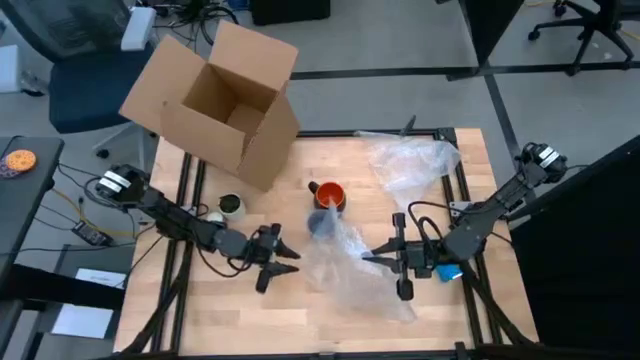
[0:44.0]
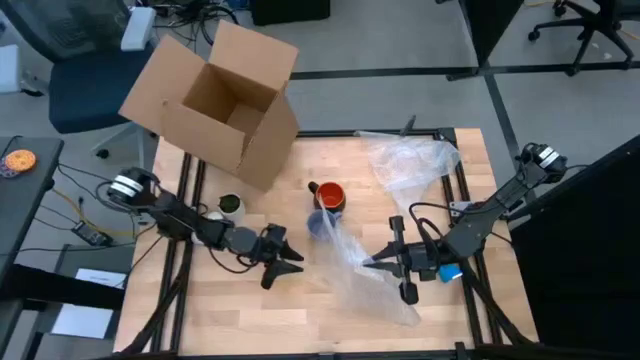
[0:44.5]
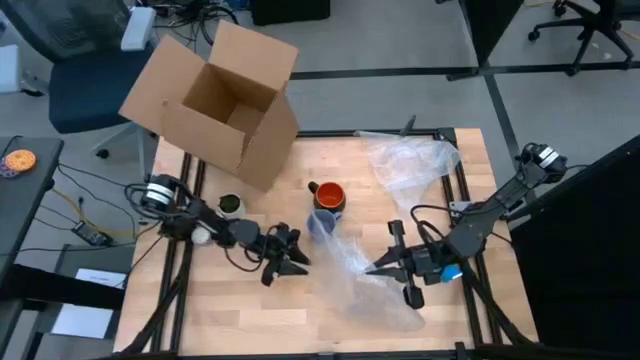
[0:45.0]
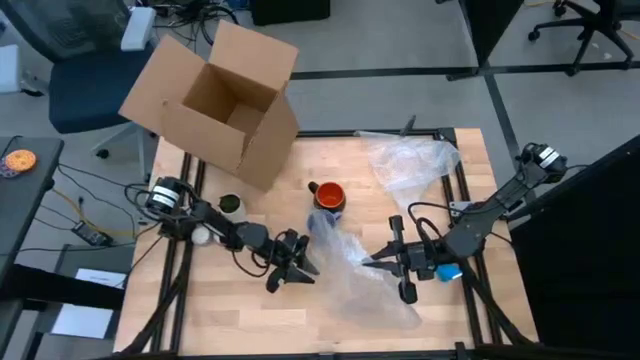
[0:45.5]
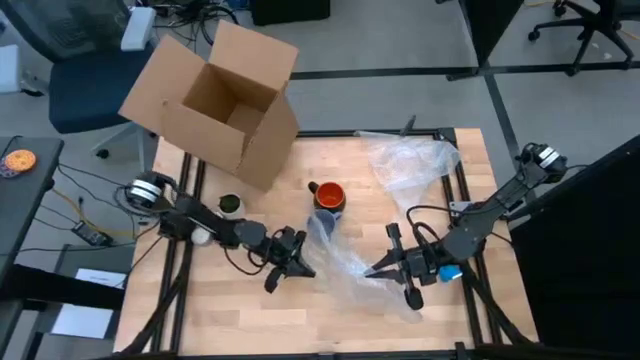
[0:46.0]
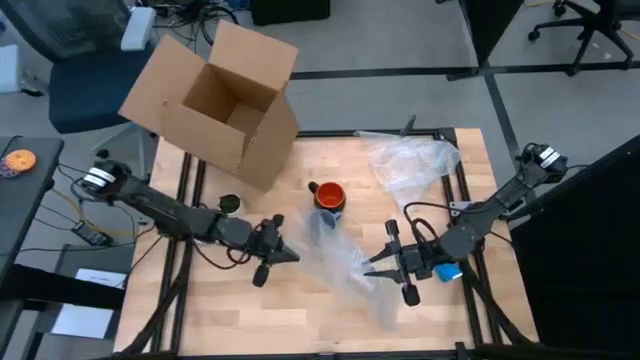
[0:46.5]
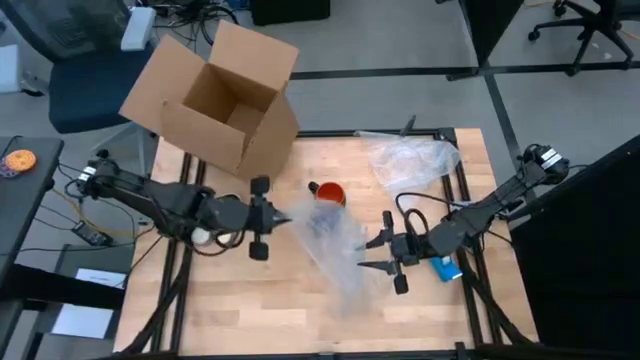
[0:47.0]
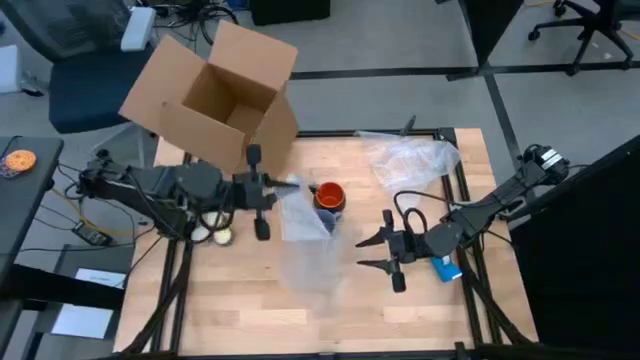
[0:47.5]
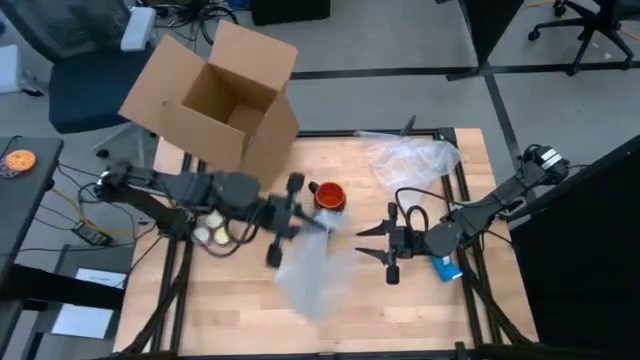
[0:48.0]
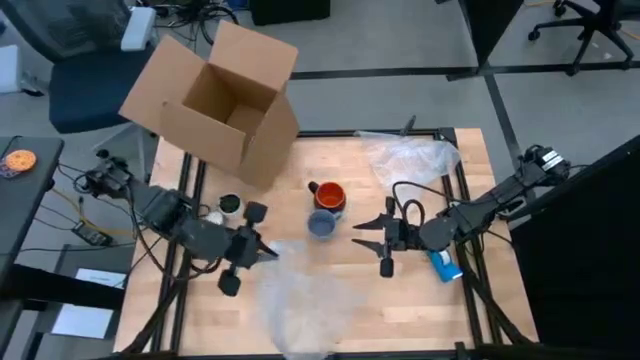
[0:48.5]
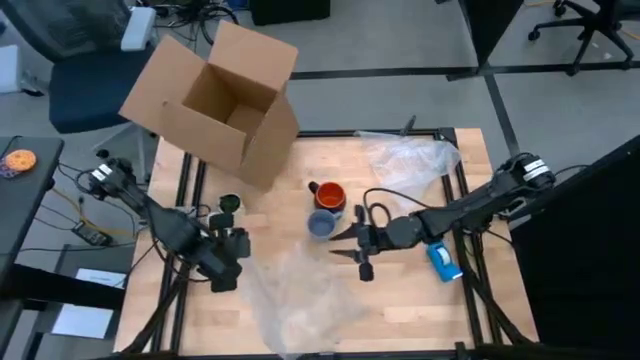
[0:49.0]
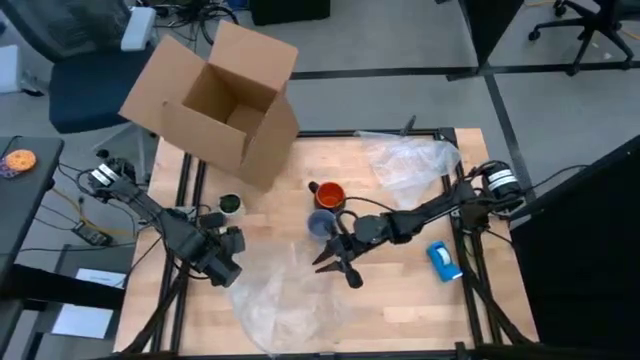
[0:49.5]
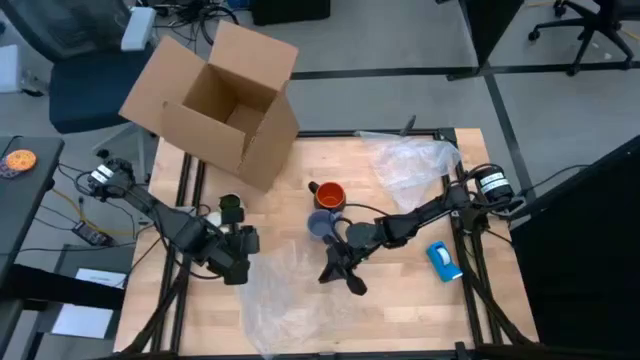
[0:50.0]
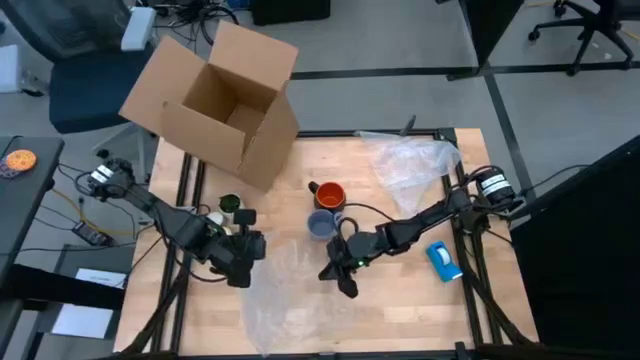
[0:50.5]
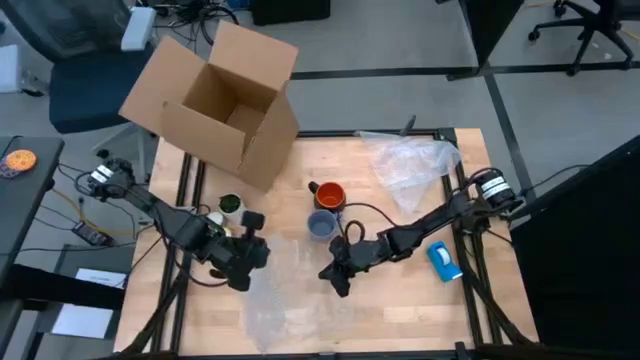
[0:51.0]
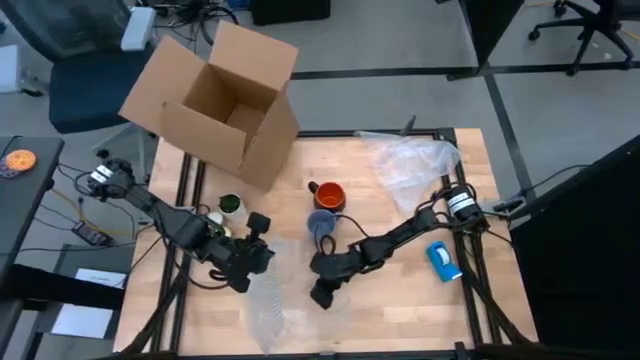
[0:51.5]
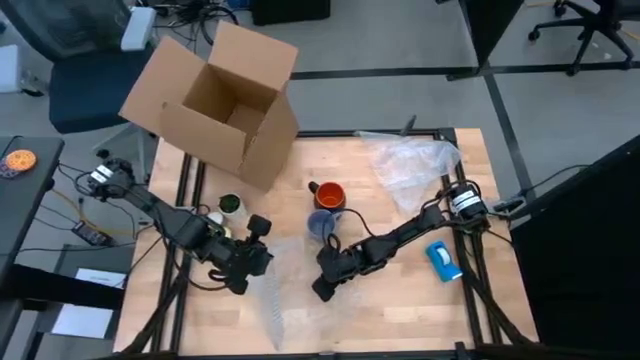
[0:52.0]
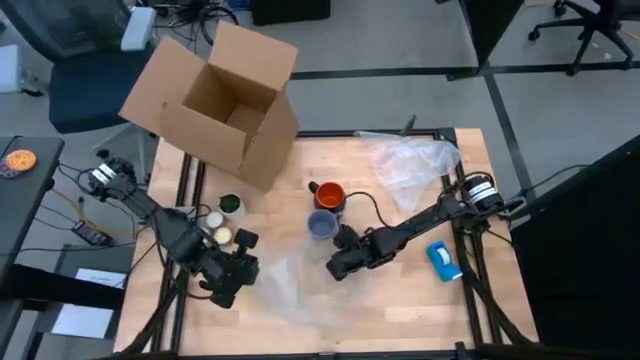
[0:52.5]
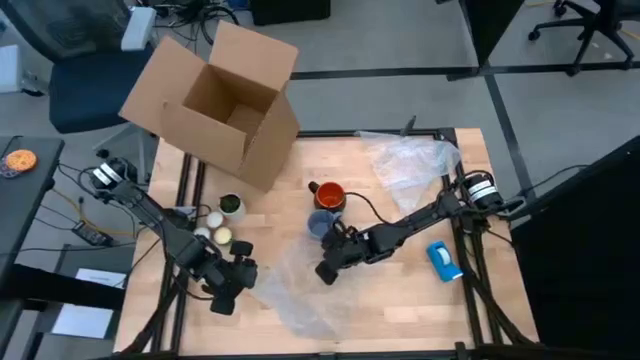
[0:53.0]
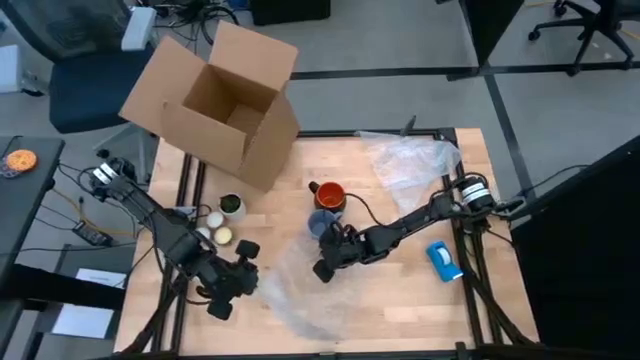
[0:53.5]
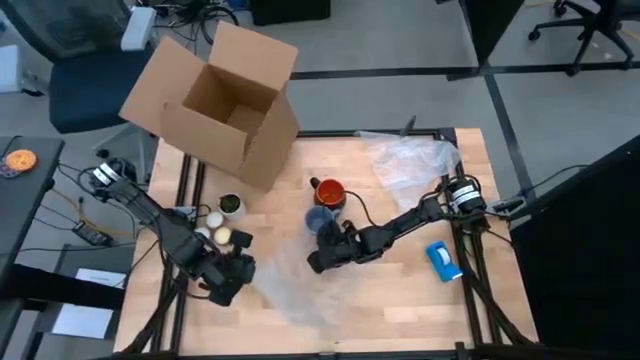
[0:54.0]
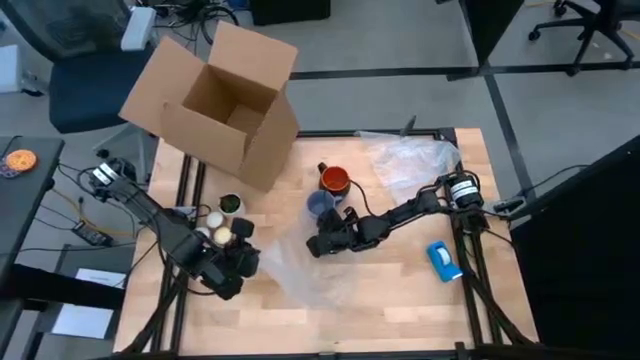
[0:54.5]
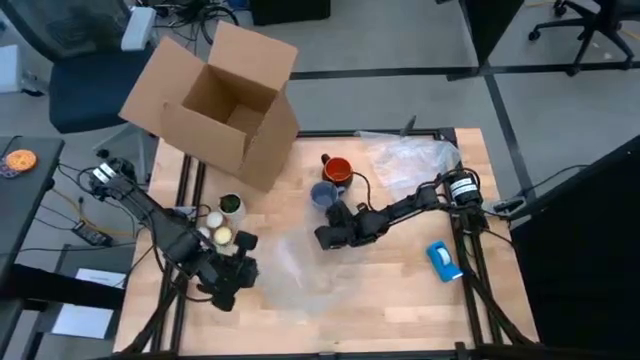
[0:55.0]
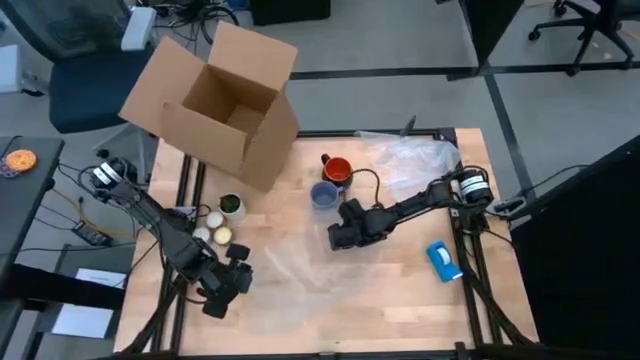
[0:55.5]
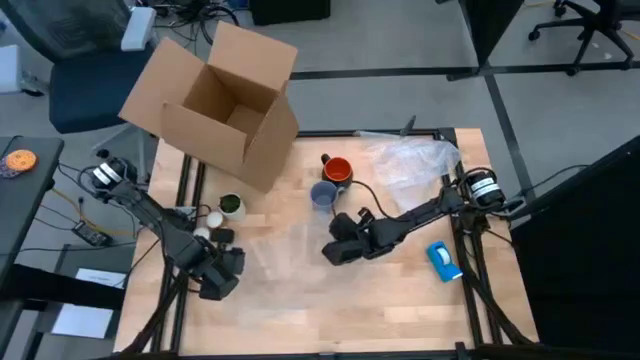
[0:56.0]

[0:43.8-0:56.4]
Task: wrap mug
Prepare the bubble wrap

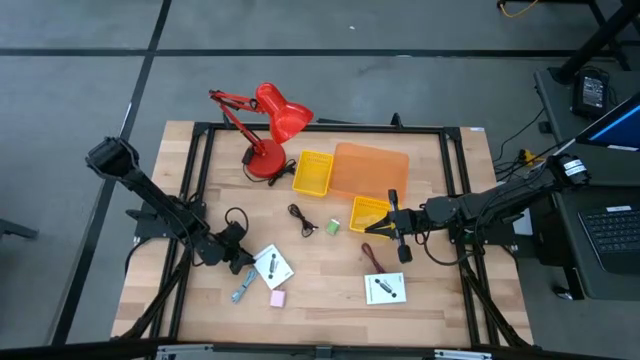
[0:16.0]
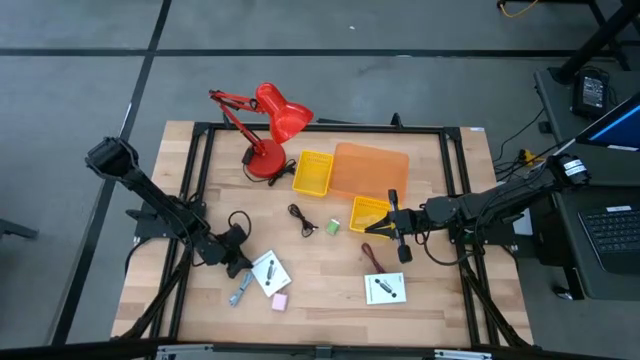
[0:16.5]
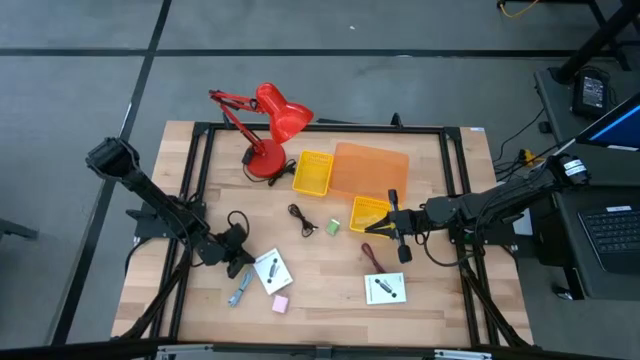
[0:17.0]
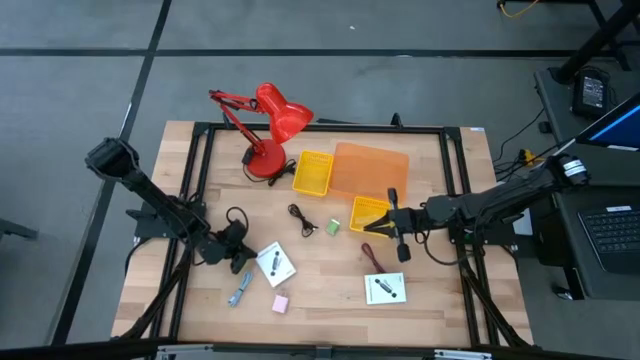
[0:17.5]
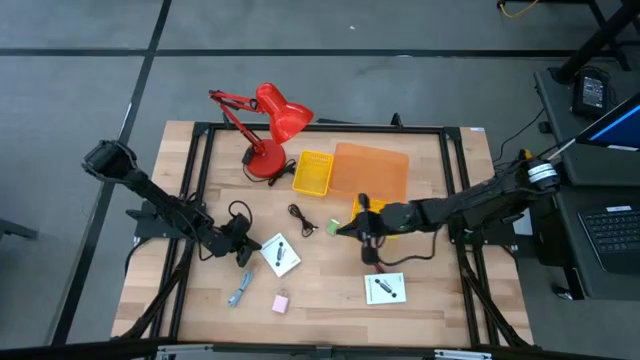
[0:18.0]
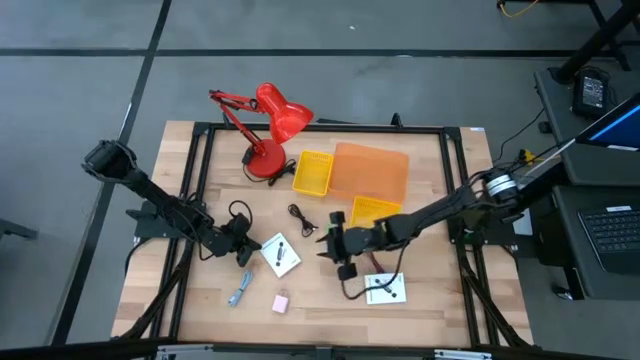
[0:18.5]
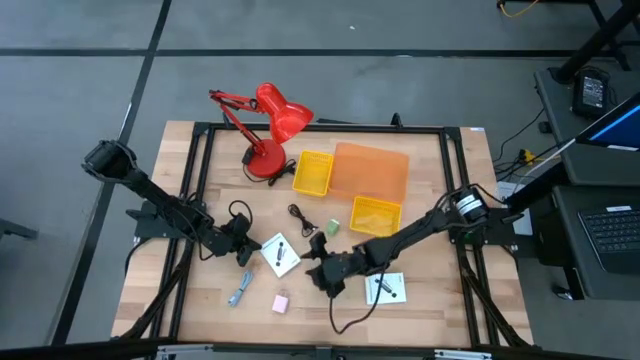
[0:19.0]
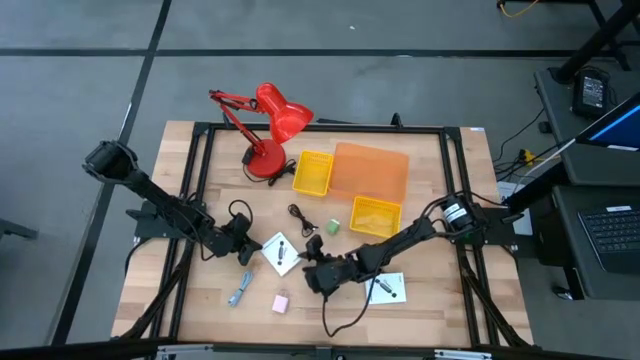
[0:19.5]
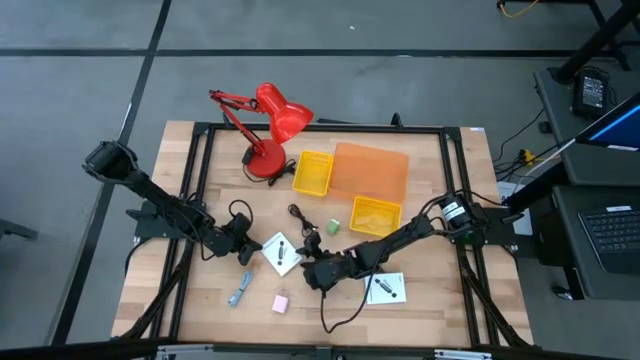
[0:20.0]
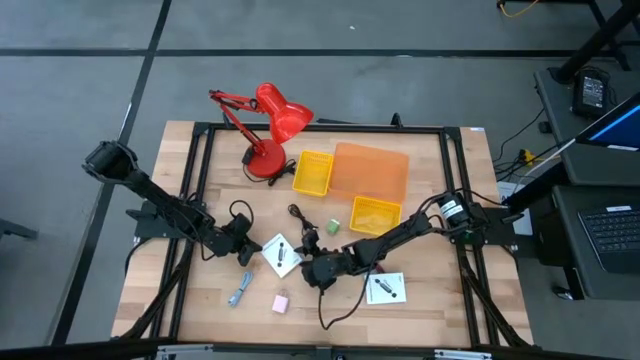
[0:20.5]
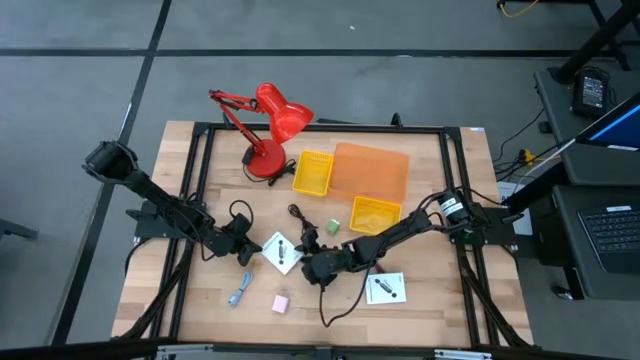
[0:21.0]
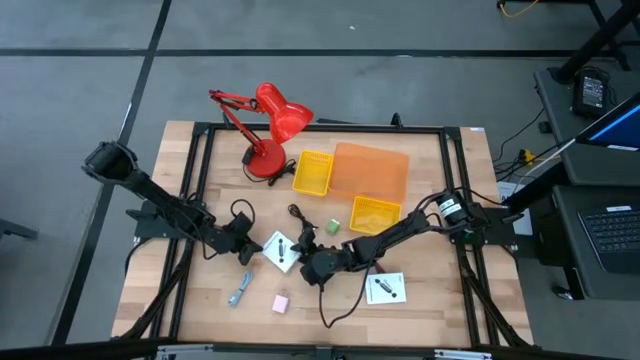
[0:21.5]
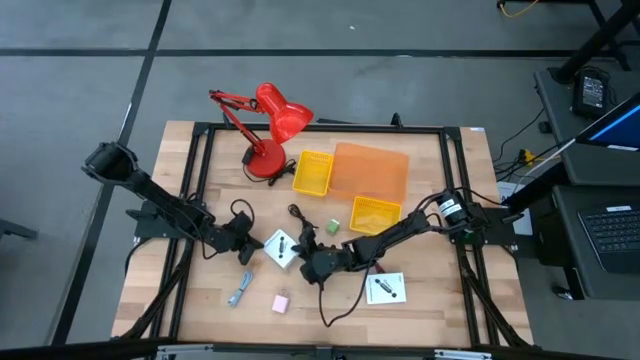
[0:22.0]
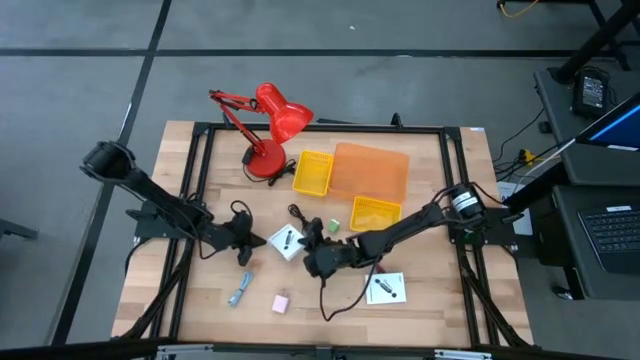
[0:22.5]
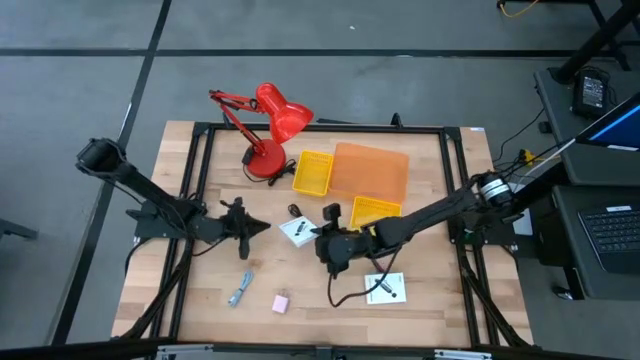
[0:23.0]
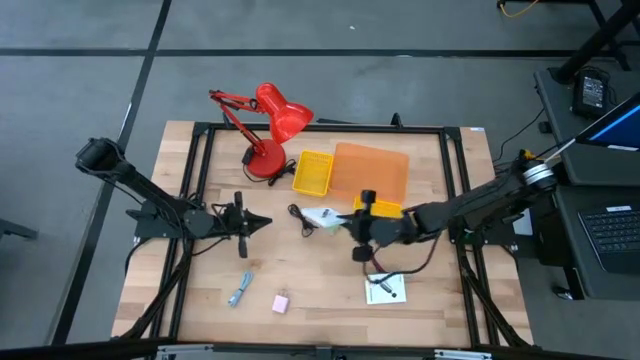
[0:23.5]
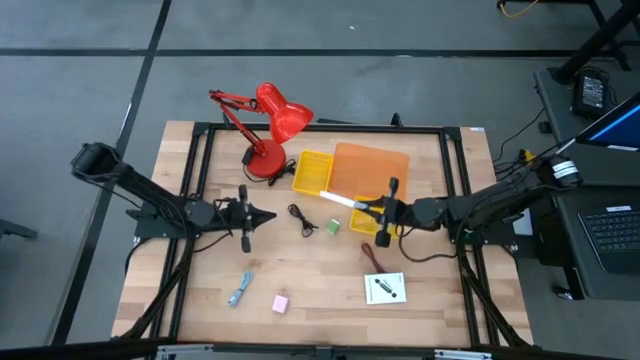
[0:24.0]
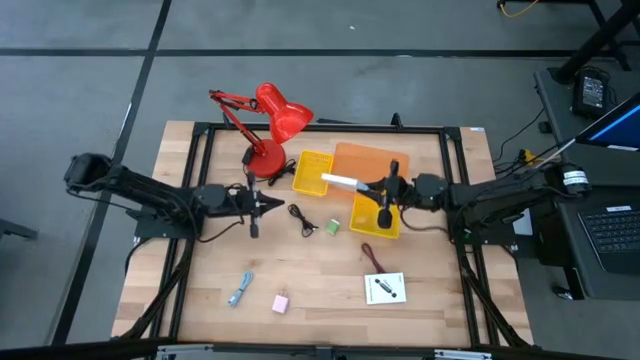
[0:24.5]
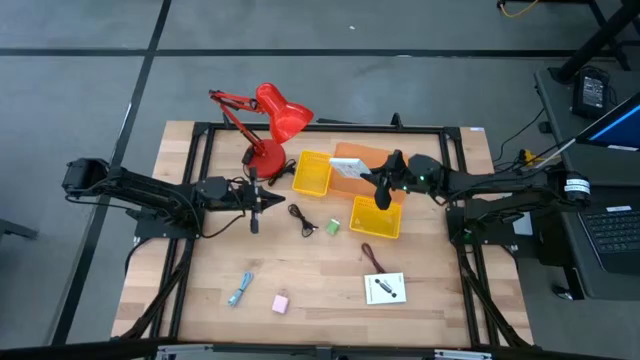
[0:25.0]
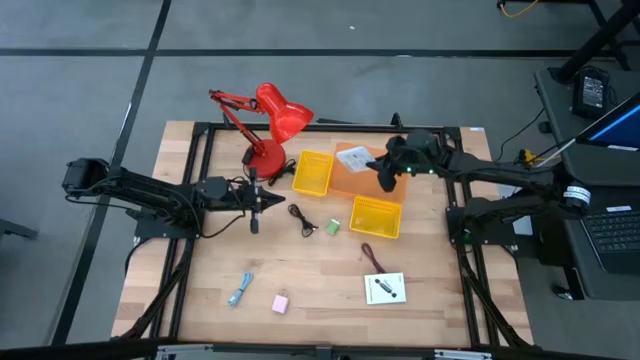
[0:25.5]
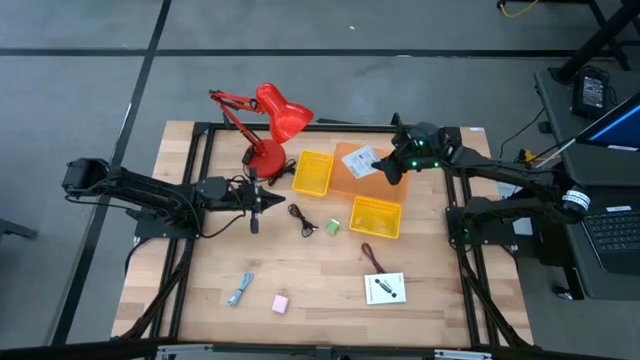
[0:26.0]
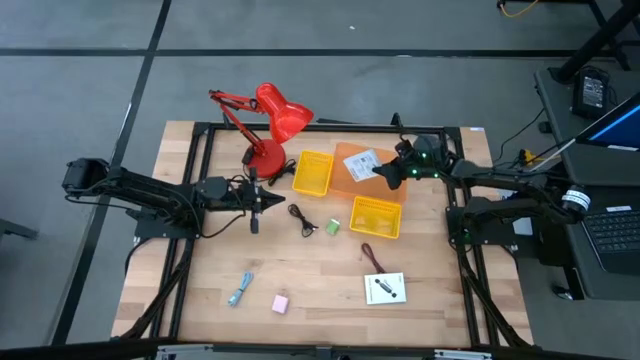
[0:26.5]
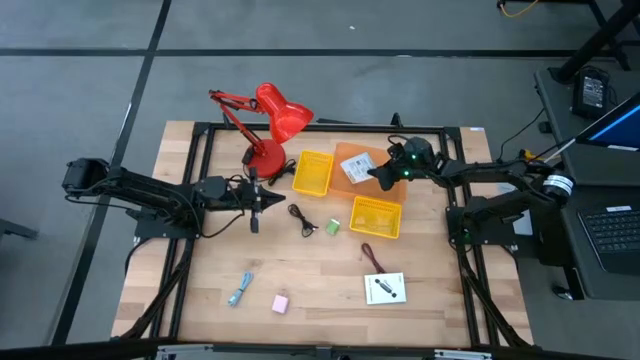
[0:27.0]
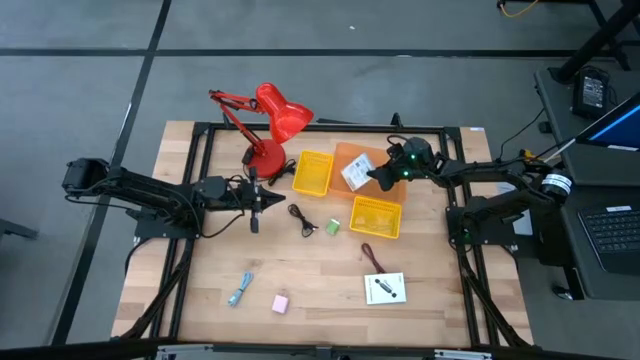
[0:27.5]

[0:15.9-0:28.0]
Task: Pick and place items into bin
Put the left white box into the orange bin
